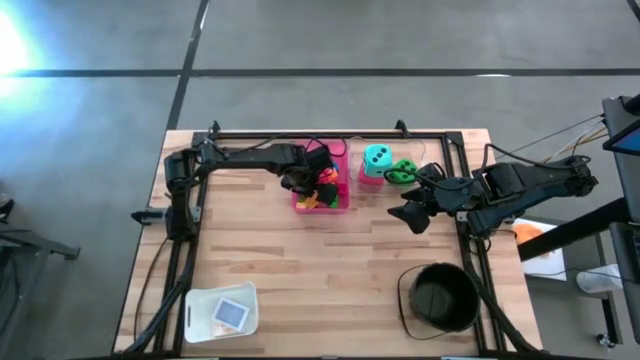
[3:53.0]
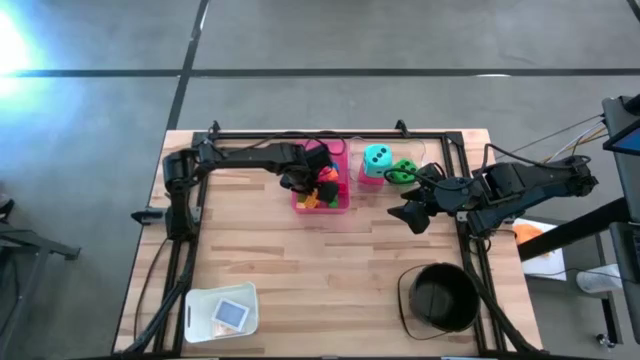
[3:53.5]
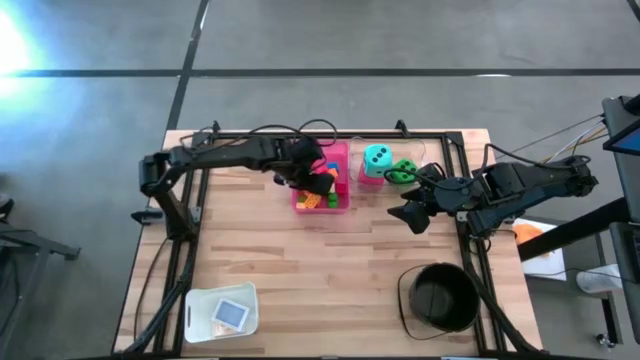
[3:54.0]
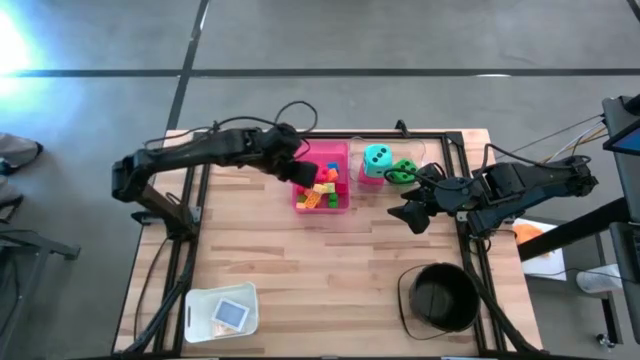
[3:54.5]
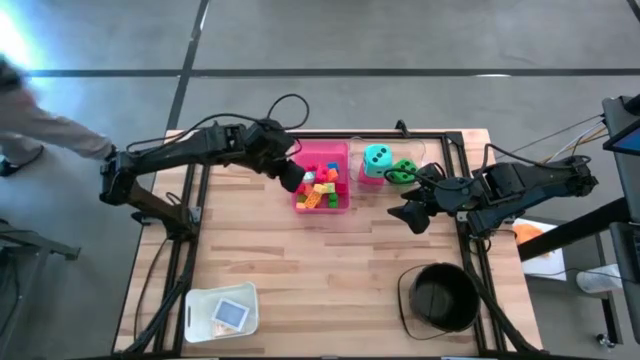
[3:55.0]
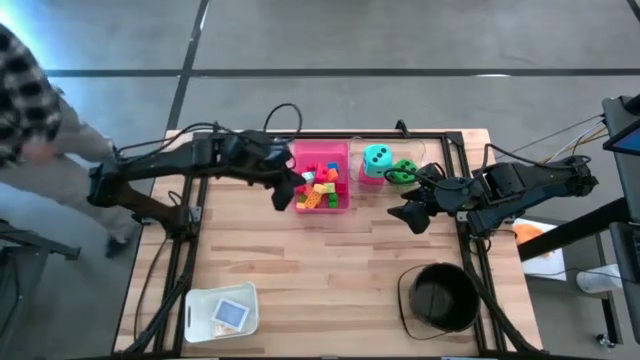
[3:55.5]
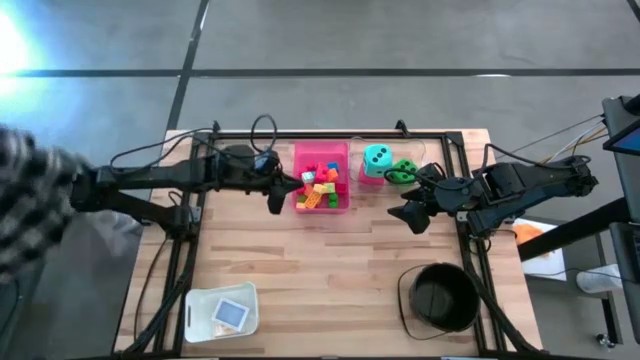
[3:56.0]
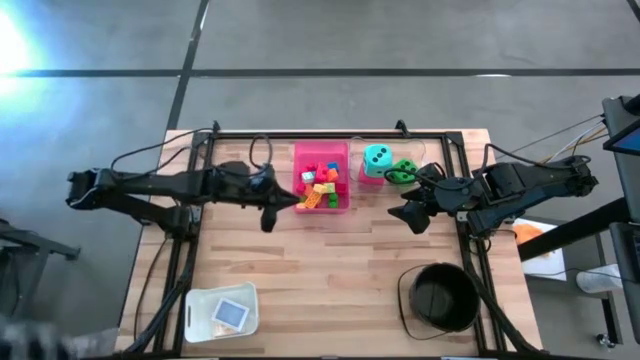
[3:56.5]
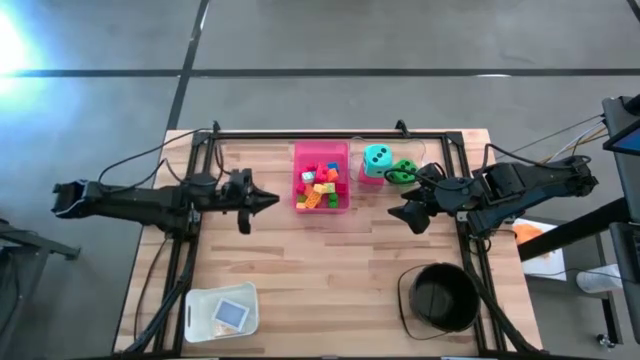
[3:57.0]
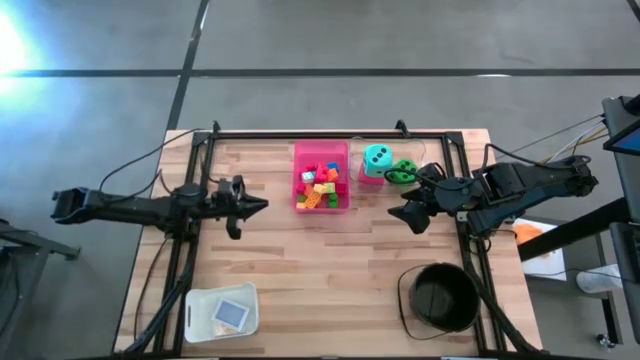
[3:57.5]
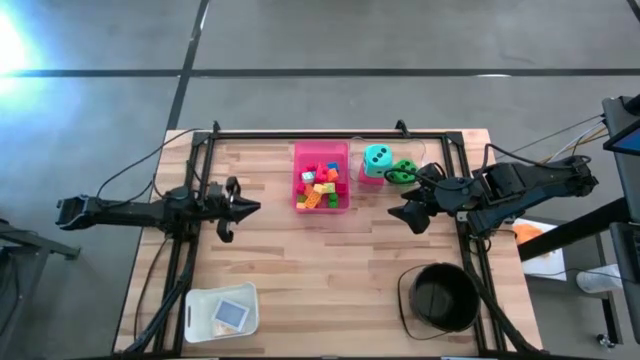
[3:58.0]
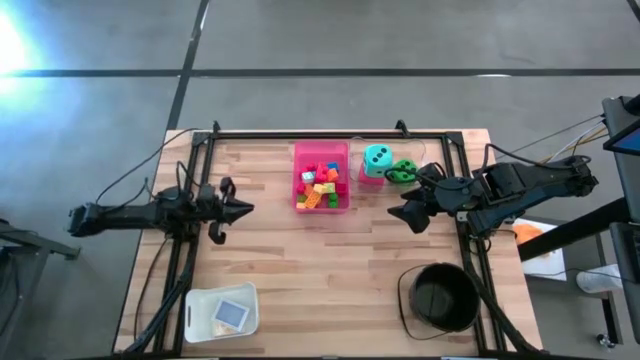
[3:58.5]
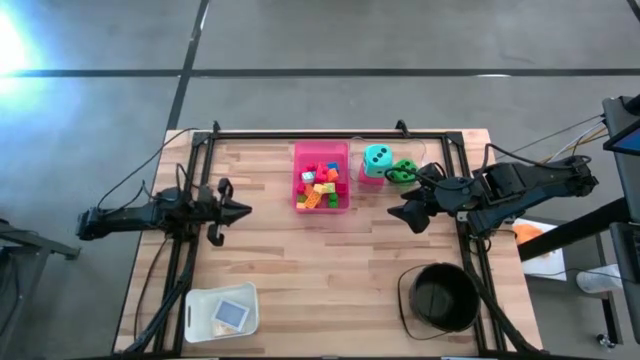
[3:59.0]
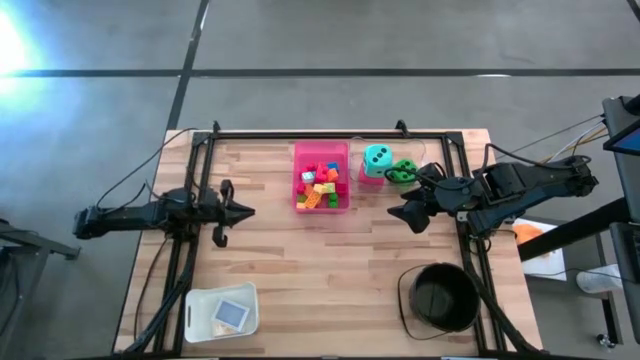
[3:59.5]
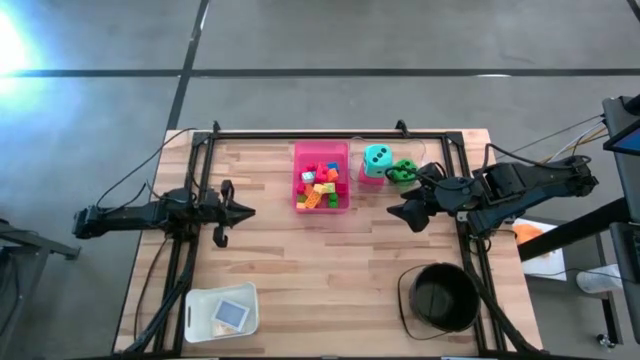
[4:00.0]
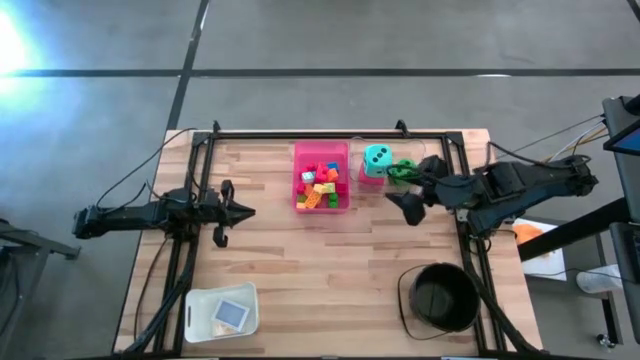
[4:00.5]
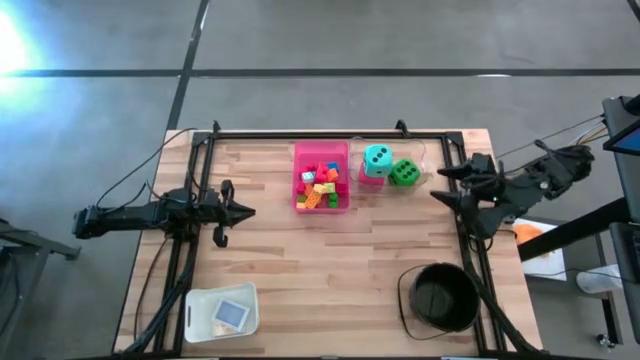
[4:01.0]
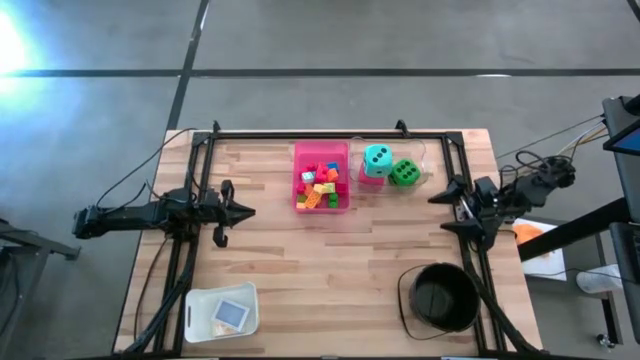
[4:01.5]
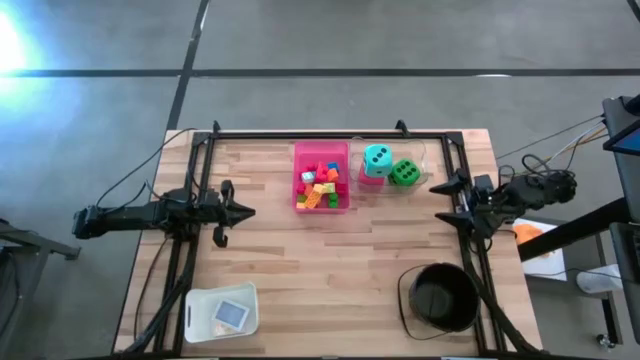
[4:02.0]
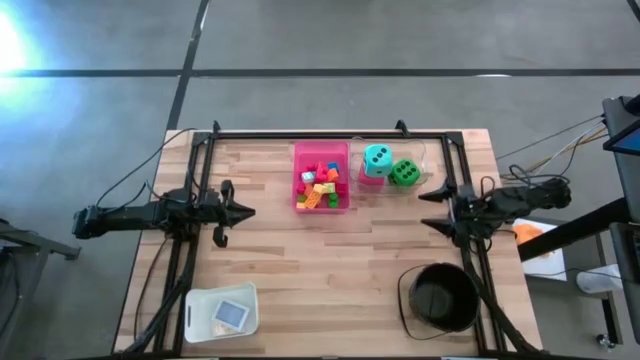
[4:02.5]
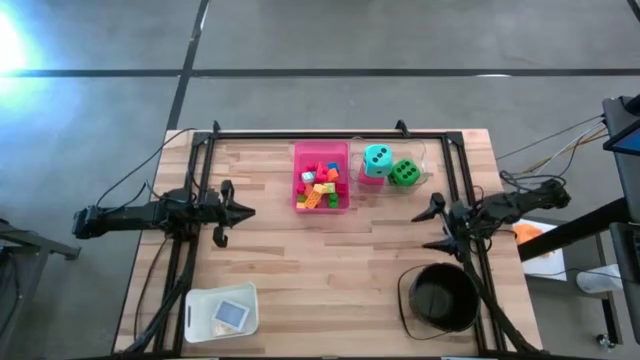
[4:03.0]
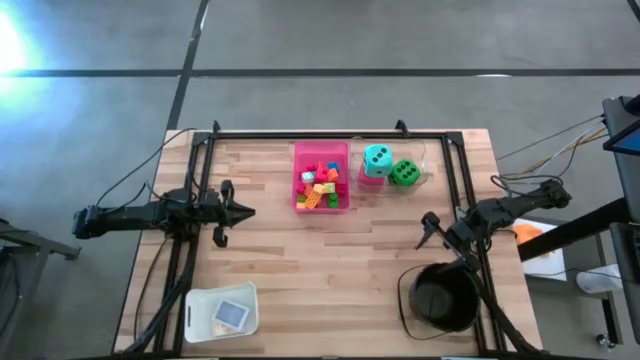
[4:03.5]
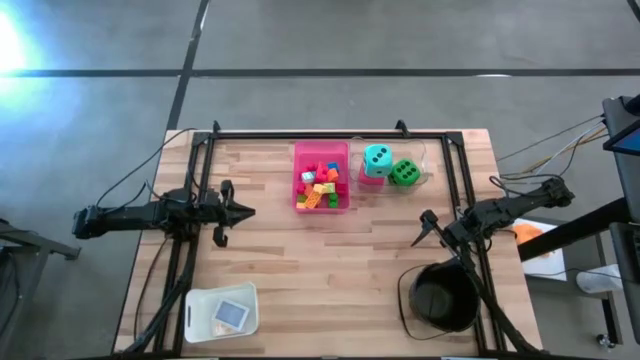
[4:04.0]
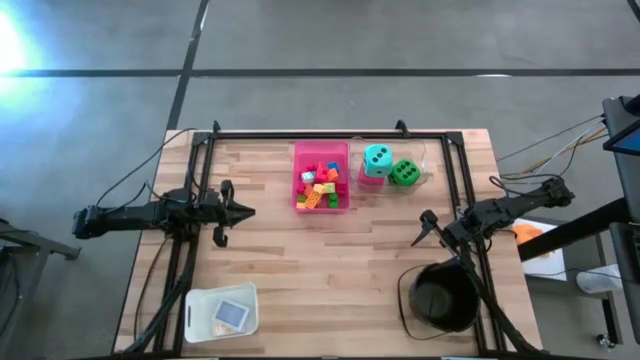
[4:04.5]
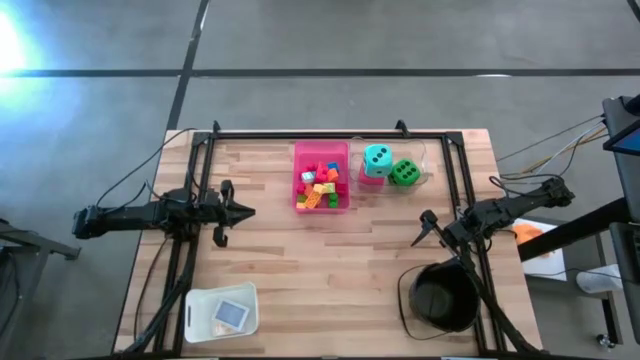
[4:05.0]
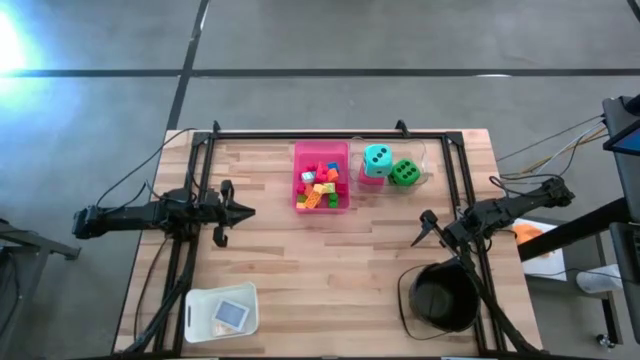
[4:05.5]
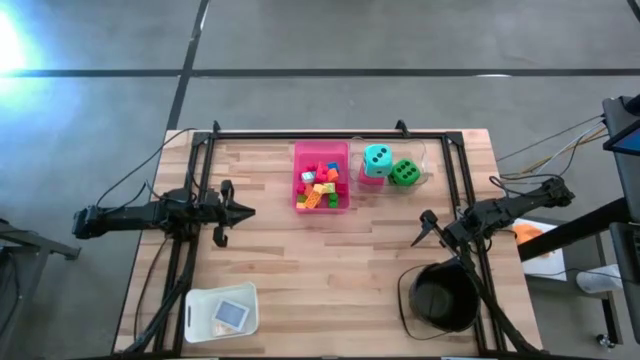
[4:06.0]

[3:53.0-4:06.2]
Task: Pick & Place Toys
Return to Home Position

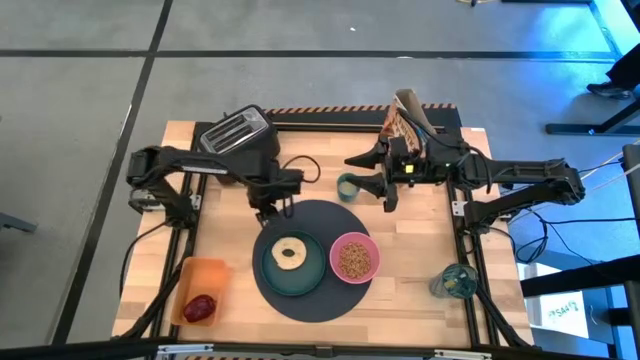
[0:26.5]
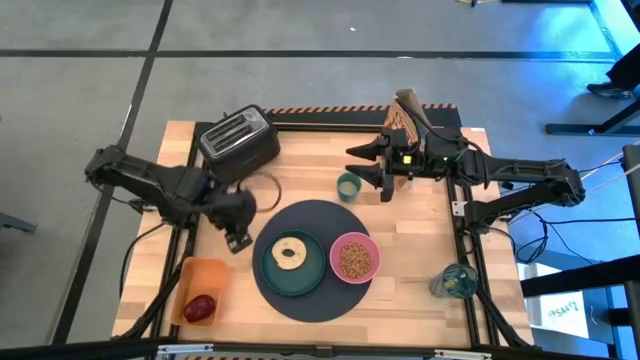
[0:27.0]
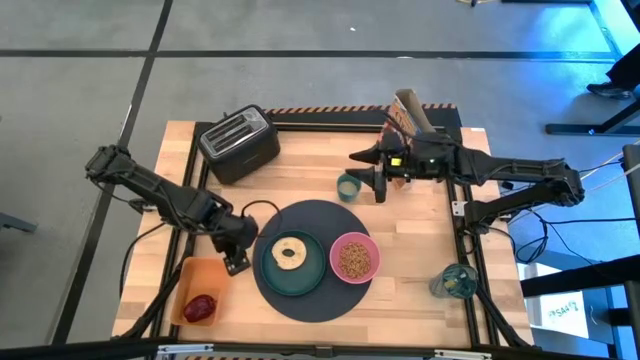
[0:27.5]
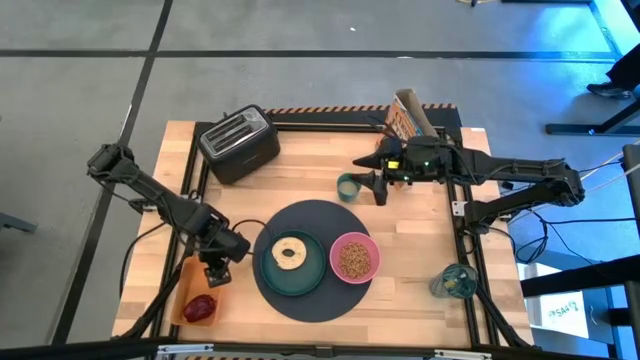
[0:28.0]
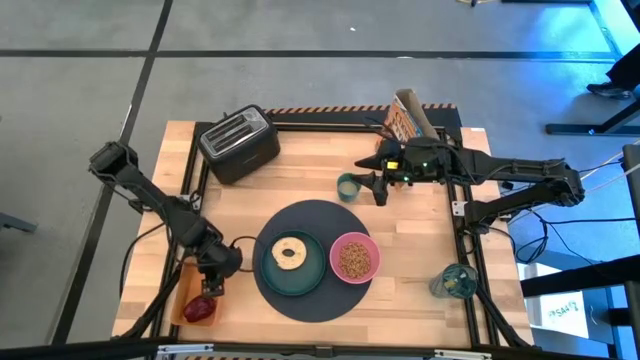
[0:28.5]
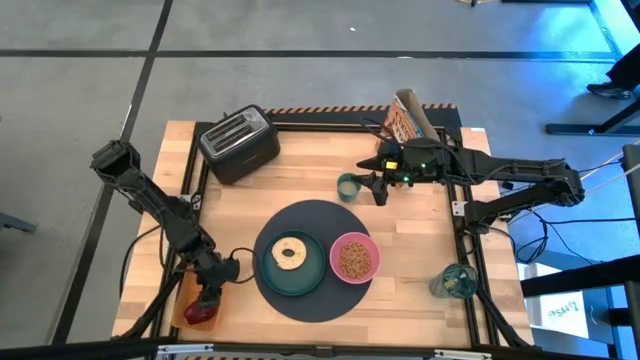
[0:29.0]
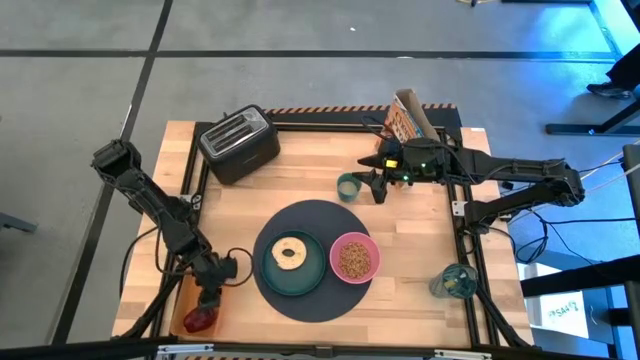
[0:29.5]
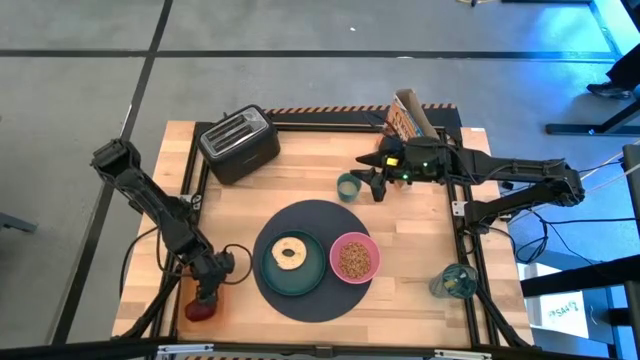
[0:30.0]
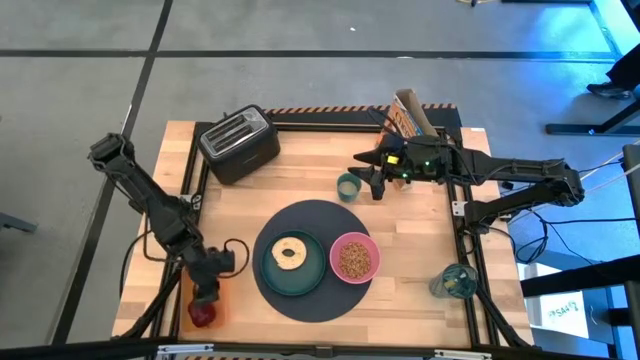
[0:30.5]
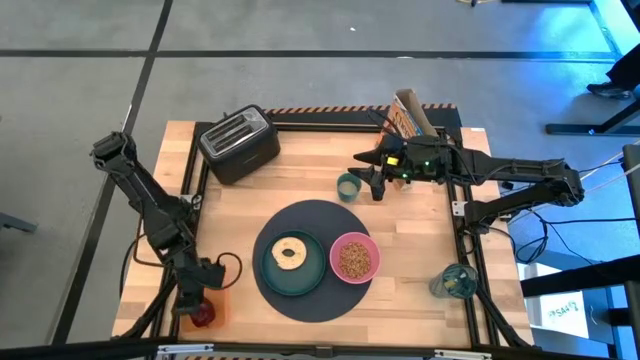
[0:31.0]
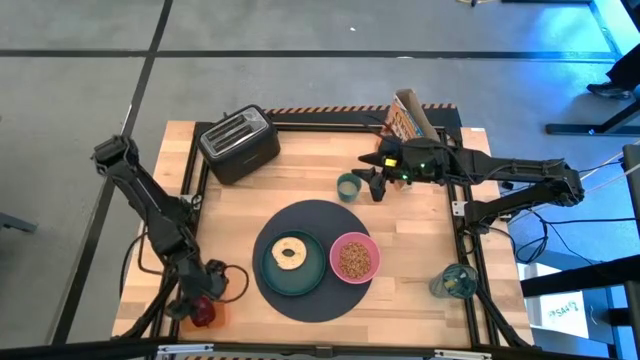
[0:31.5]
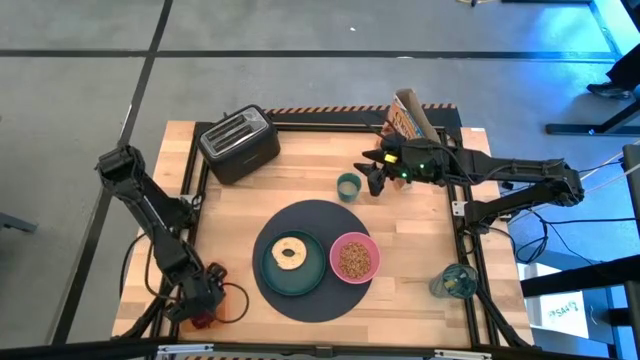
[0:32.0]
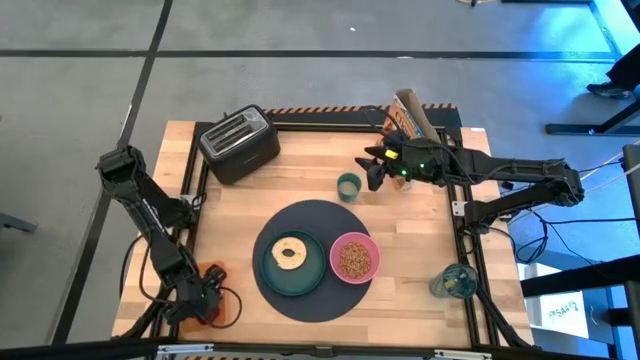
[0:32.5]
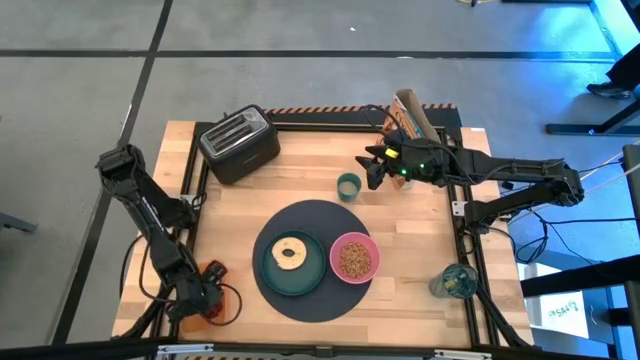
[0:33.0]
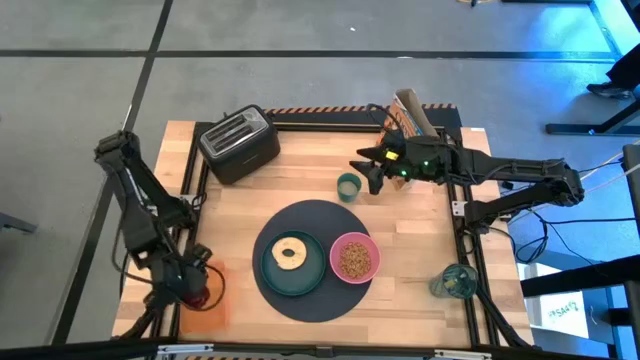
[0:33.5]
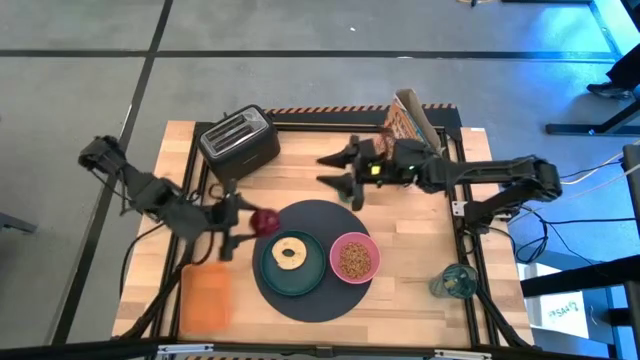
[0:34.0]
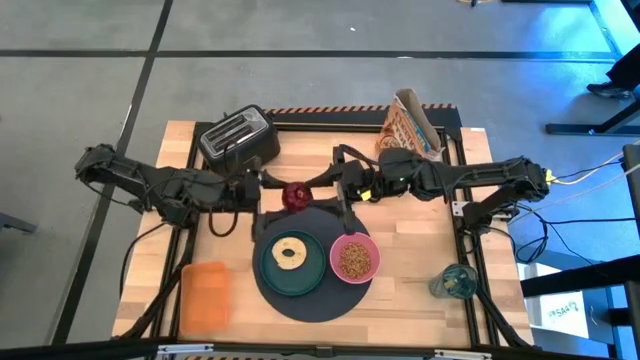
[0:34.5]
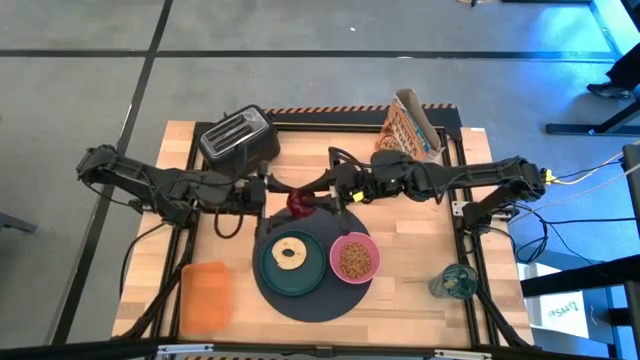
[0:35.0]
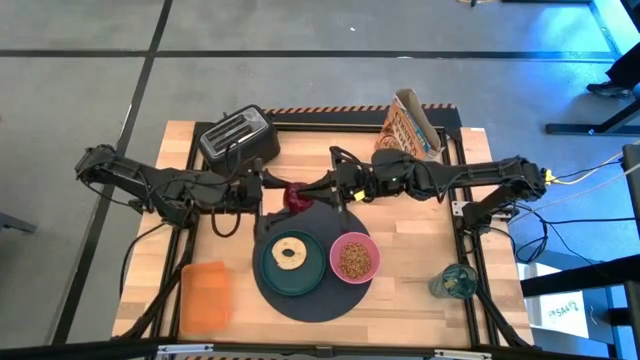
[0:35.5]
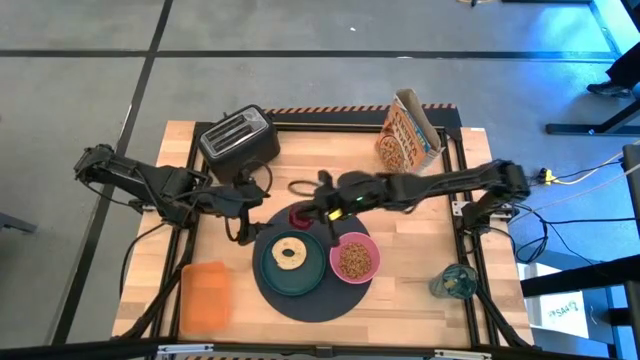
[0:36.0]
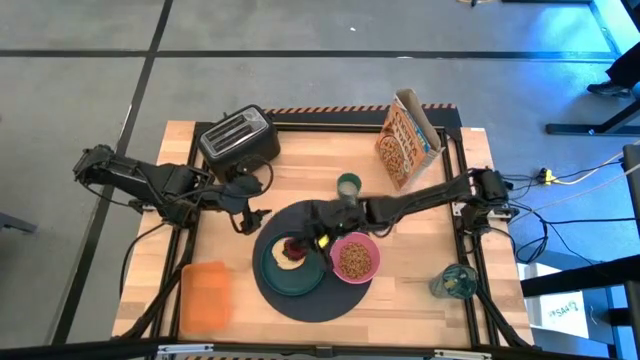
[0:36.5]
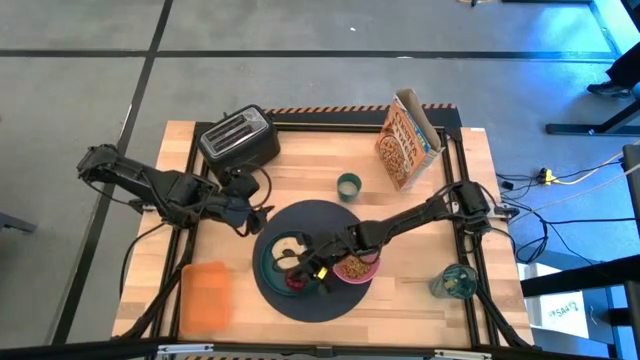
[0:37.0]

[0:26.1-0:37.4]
Task: Arrange a breakfast setting
Put the red apple from the orange bin on top of the green plate on the placemat
